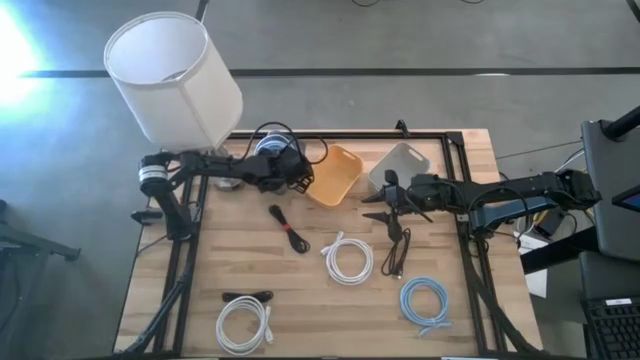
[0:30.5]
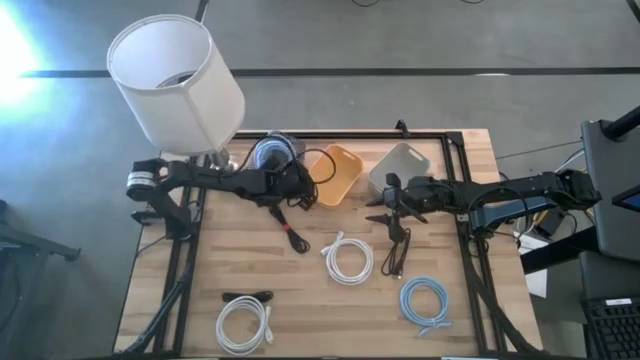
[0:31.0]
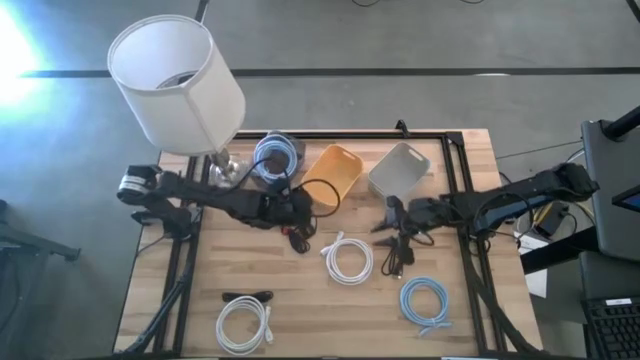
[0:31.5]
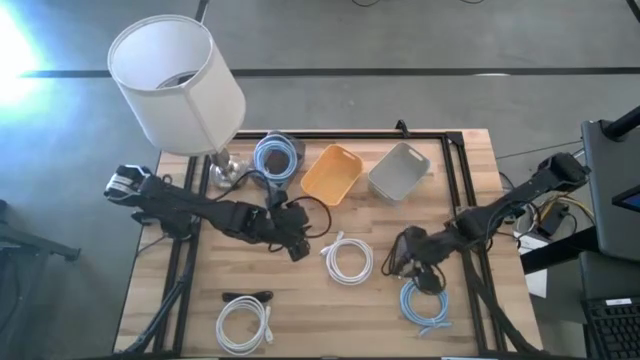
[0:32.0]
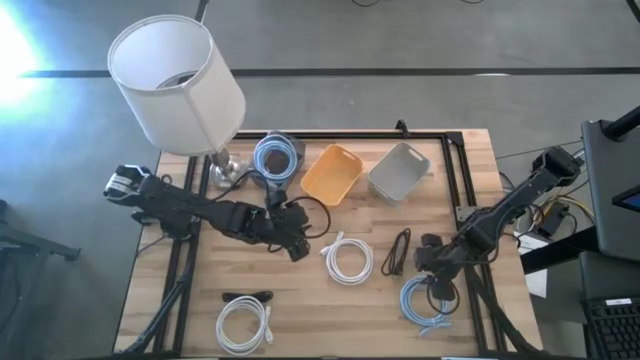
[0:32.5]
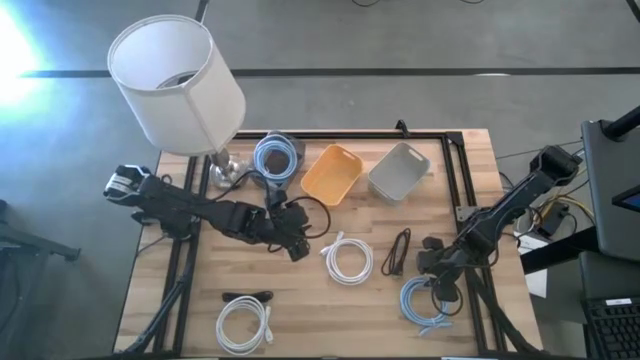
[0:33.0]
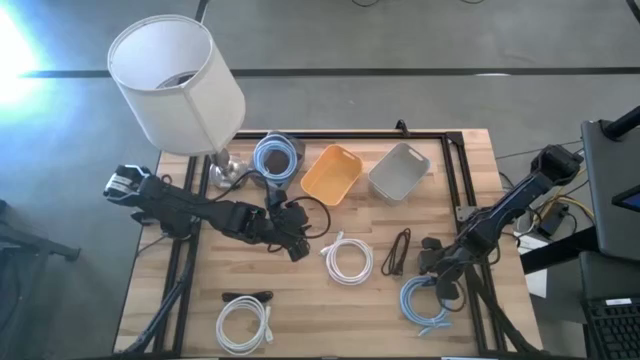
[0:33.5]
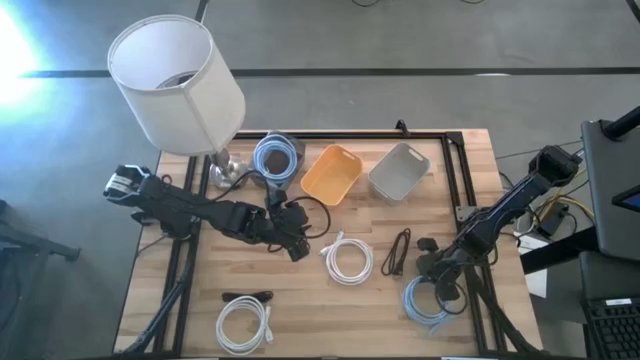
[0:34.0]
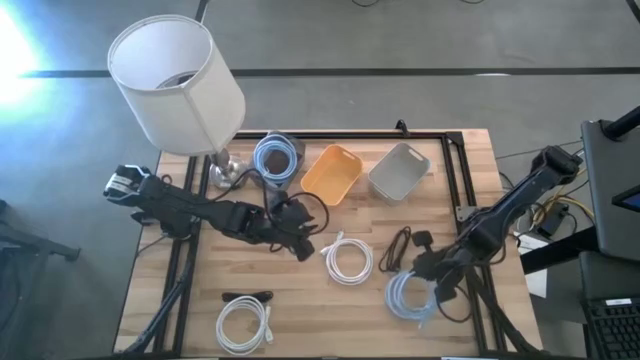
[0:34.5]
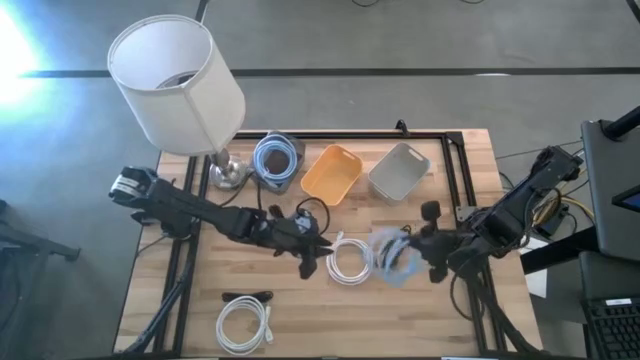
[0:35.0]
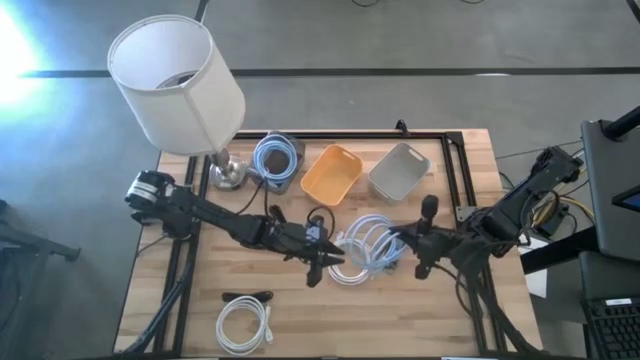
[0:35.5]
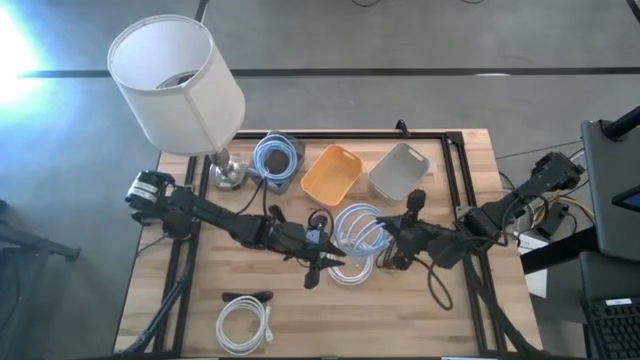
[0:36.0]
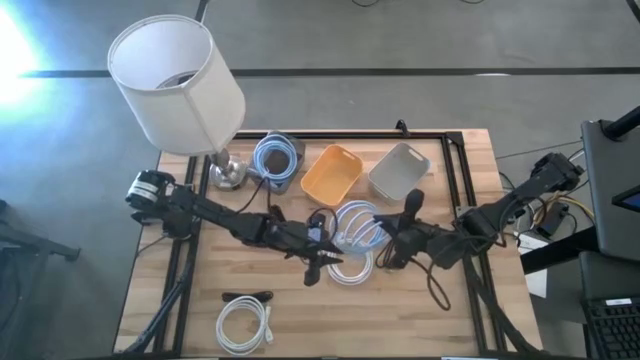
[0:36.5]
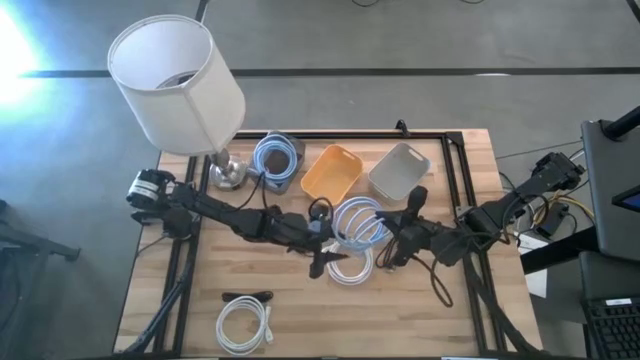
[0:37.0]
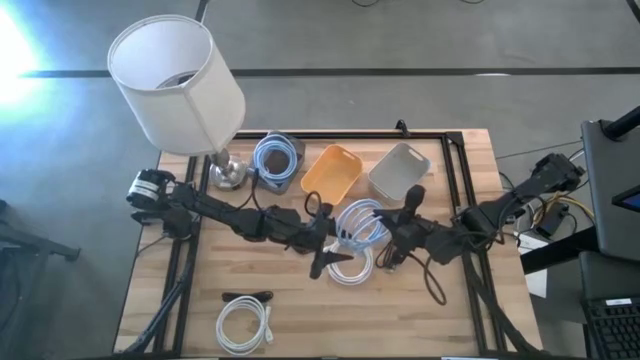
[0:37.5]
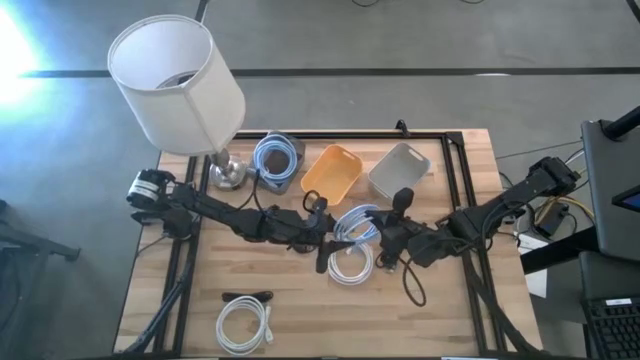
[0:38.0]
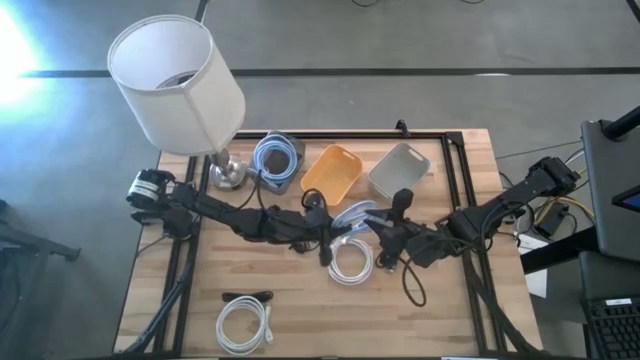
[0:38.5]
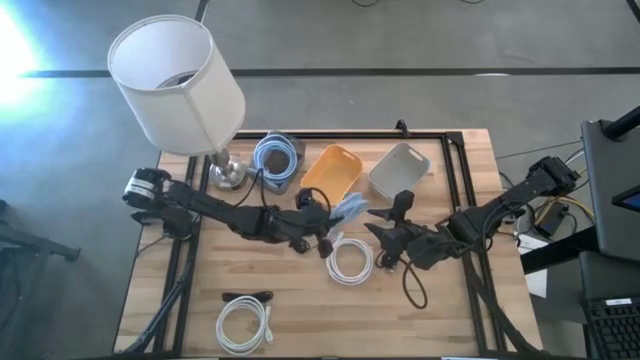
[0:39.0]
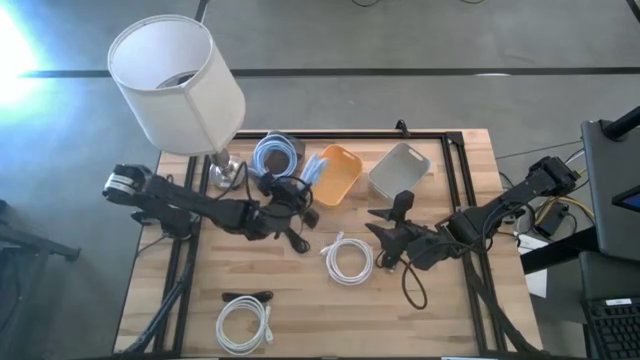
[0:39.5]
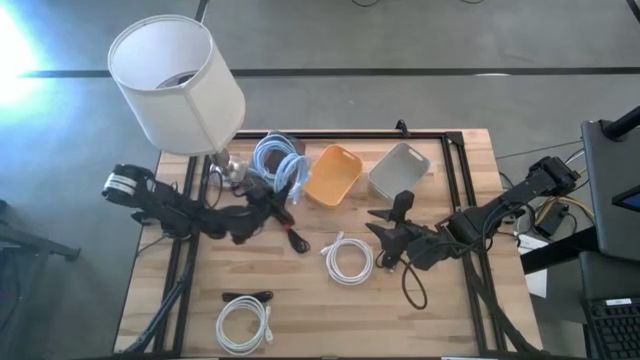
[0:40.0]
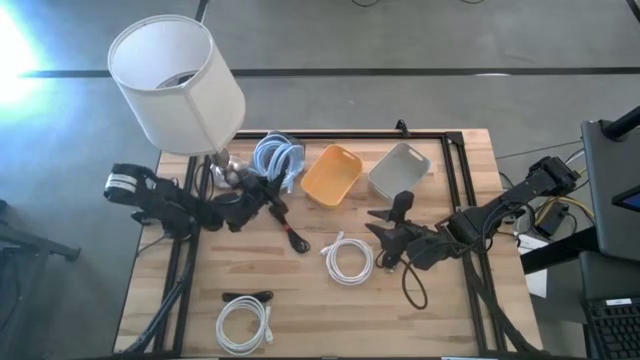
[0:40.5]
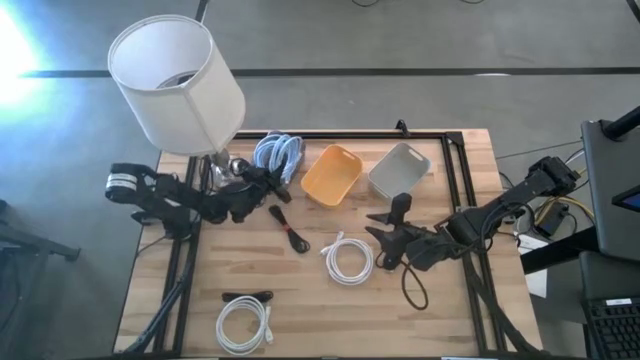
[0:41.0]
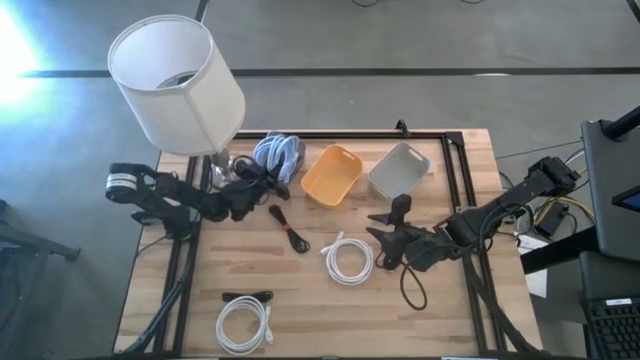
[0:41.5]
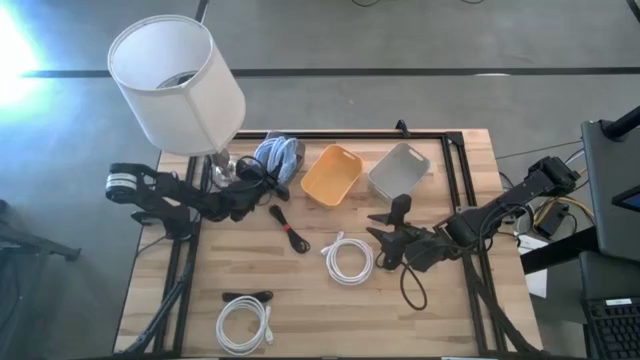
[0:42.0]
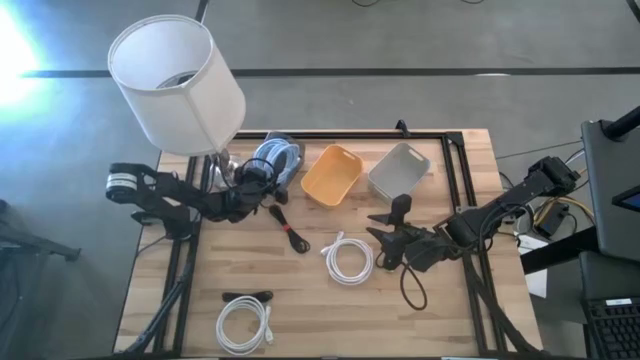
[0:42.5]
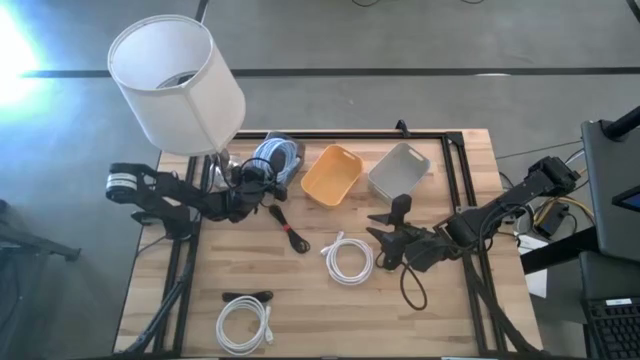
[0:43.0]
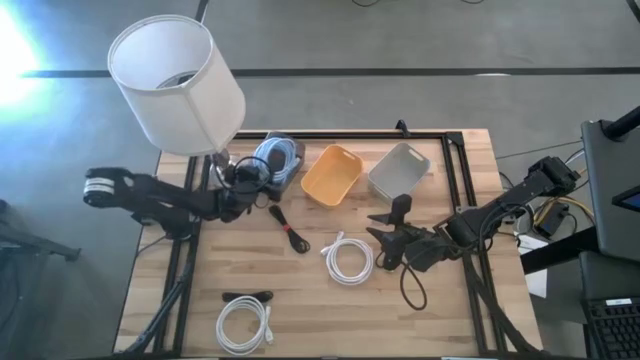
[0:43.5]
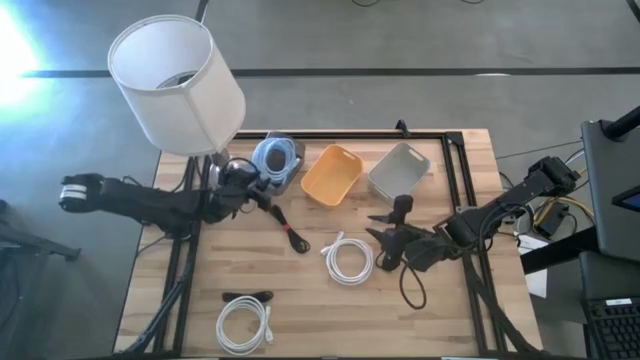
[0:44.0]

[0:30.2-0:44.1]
Task: Pick & Place USB Port
Put the blue HDMI cable into the black bin

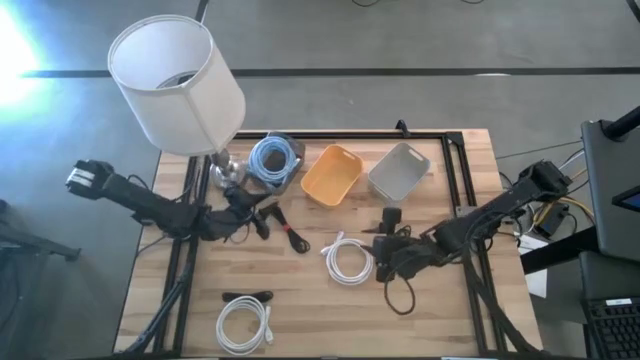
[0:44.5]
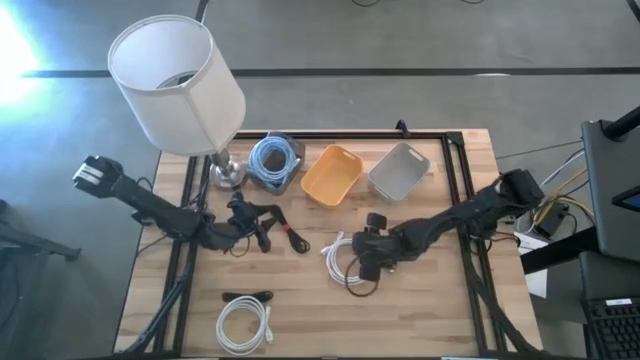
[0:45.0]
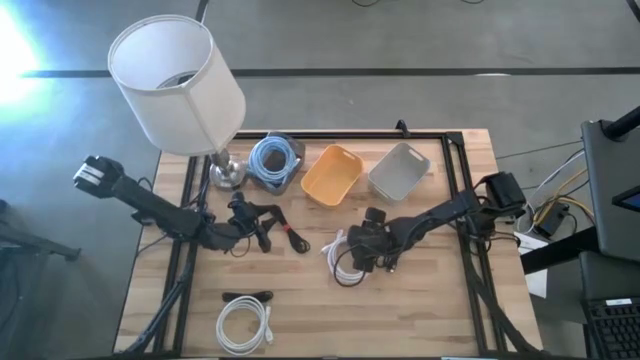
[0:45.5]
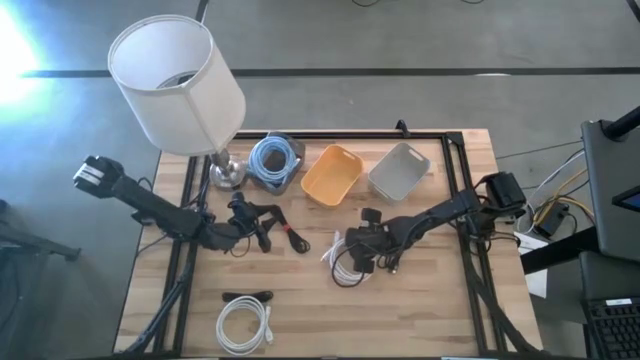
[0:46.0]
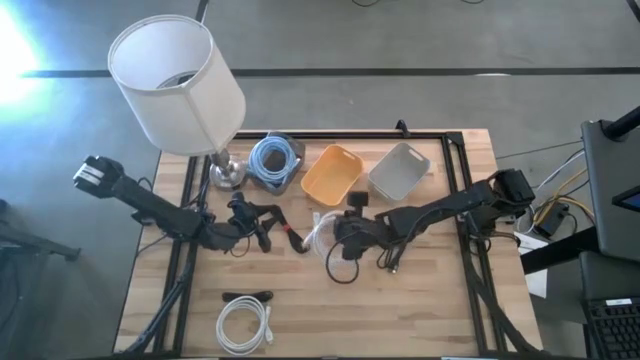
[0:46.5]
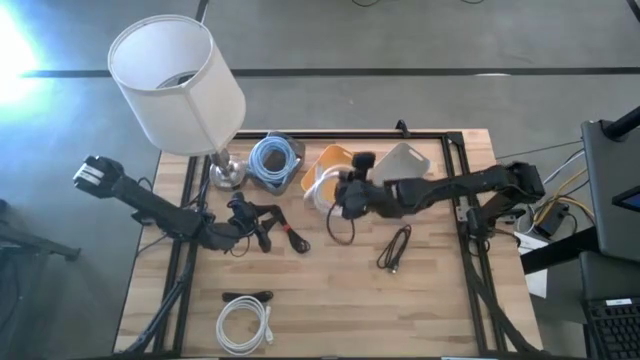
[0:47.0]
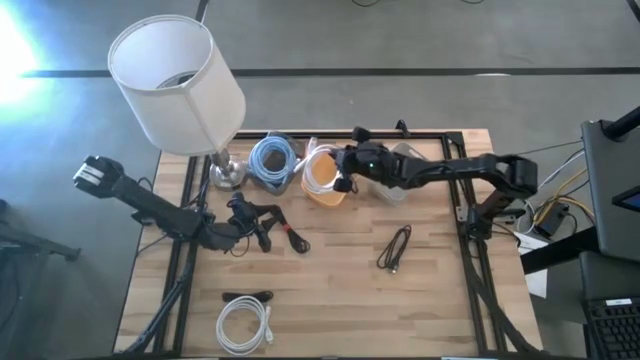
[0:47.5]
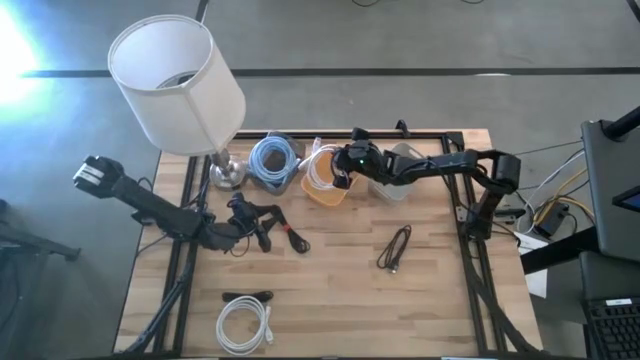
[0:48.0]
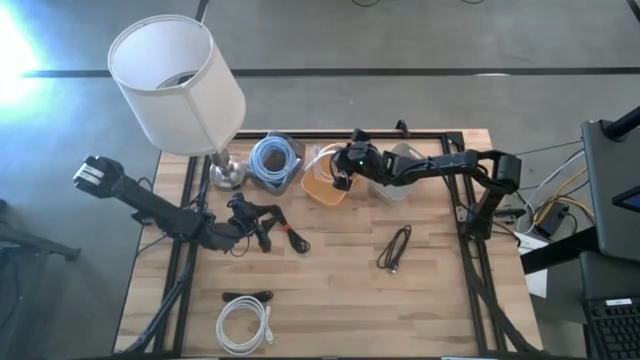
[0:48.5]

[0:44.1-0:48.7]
Put the right white HDMI cable into the yellow bin

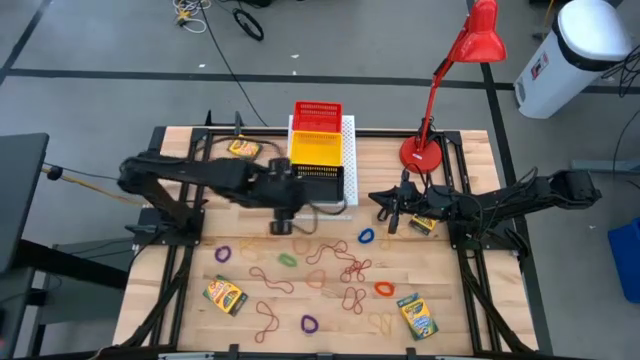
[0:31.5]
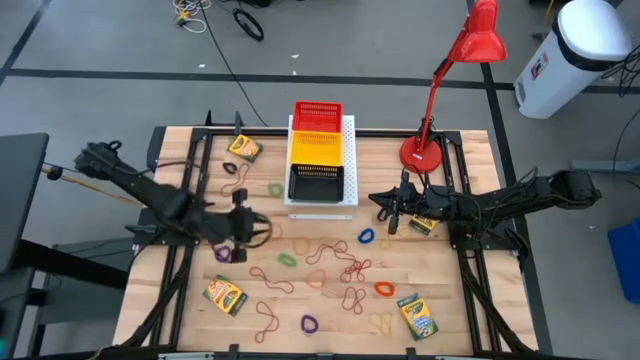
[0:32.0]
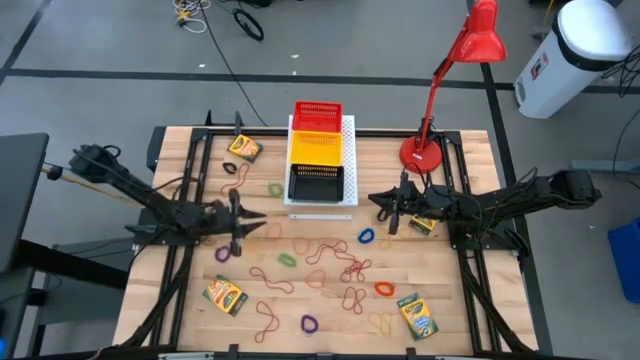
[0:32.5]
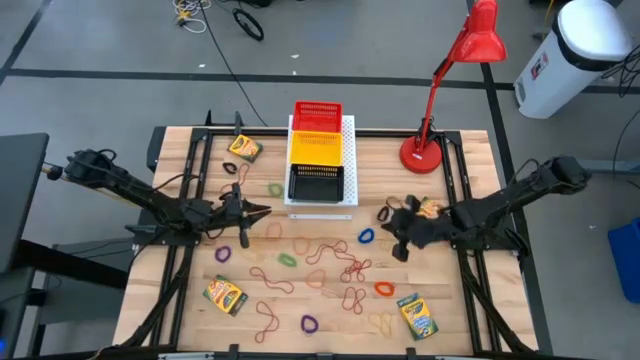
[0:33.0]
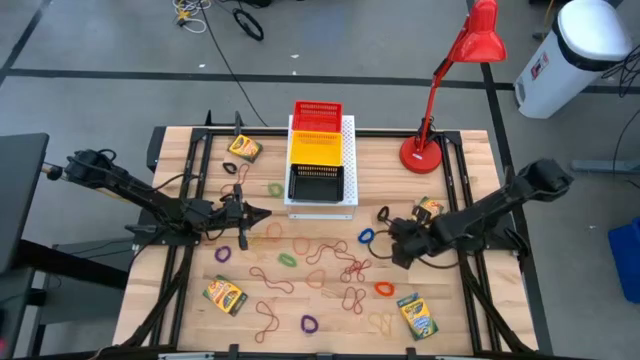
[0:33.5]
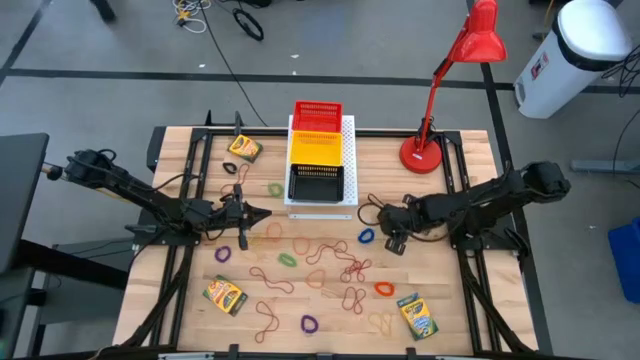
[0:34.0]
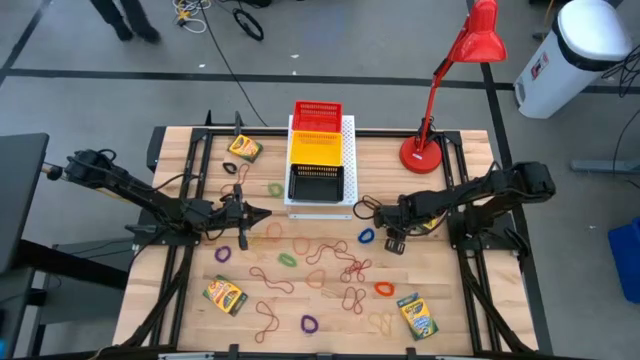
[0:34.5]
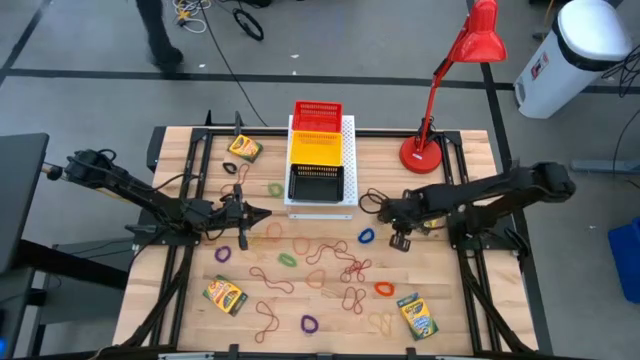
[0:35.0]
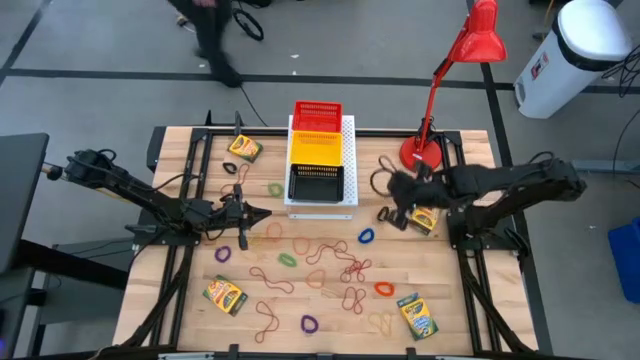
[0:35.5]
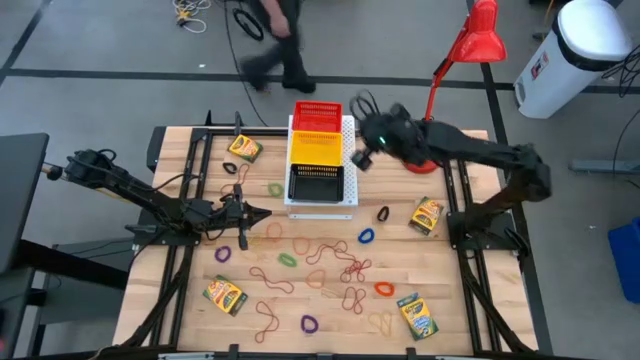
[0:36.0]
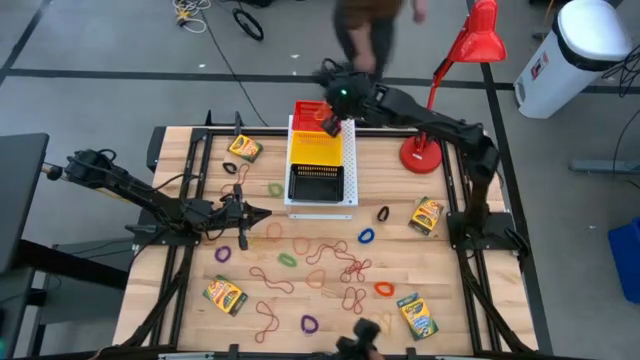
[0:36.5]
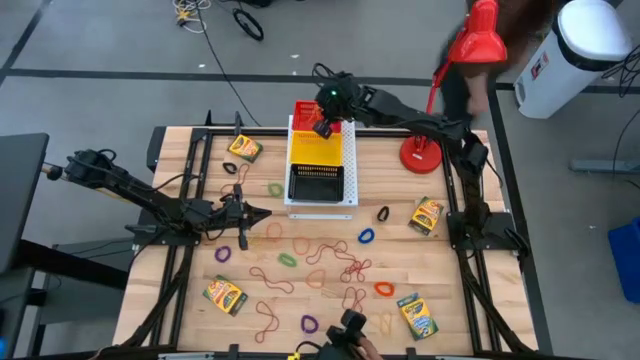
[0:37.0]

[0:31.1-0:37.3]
Task: Pick & Place Office Desk Supplies
Put the yellow rubber band into the red bin on the shelf
